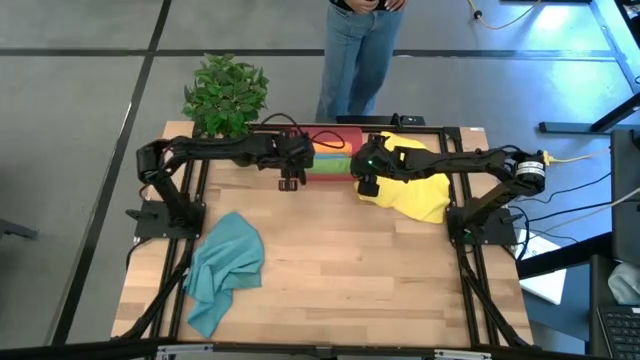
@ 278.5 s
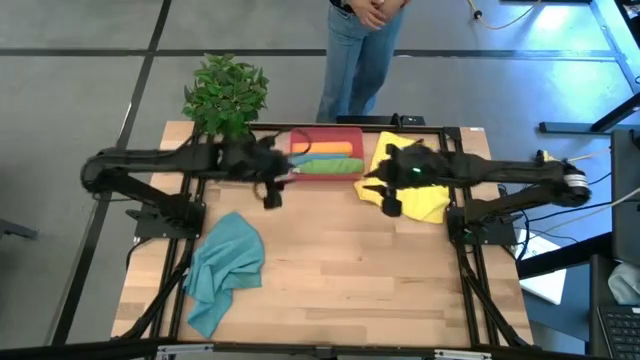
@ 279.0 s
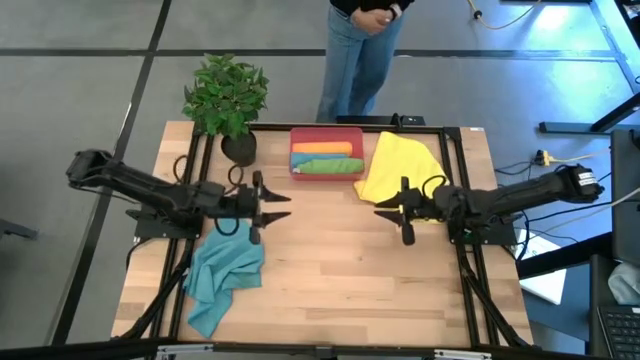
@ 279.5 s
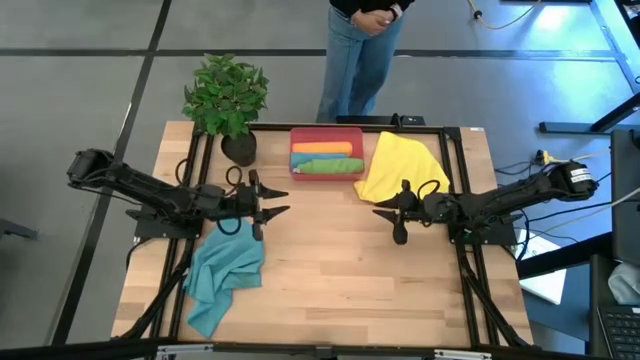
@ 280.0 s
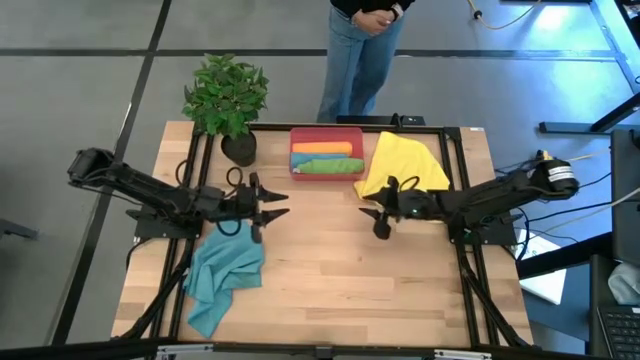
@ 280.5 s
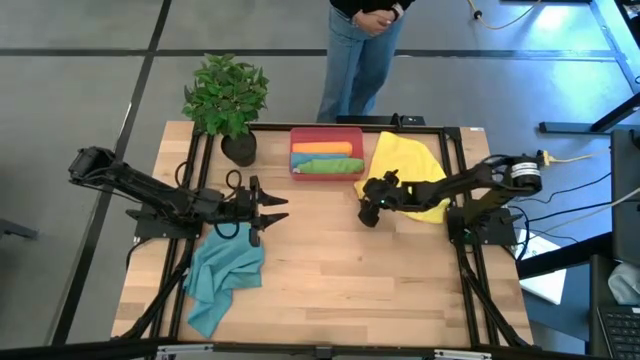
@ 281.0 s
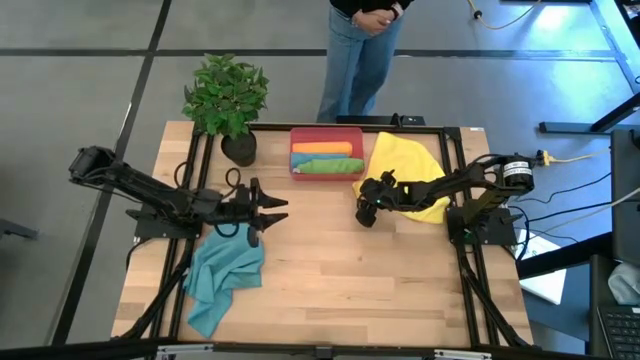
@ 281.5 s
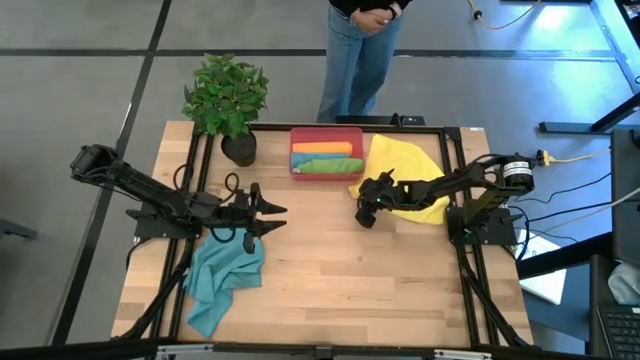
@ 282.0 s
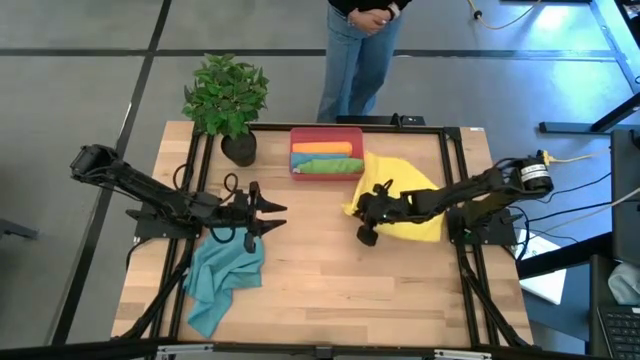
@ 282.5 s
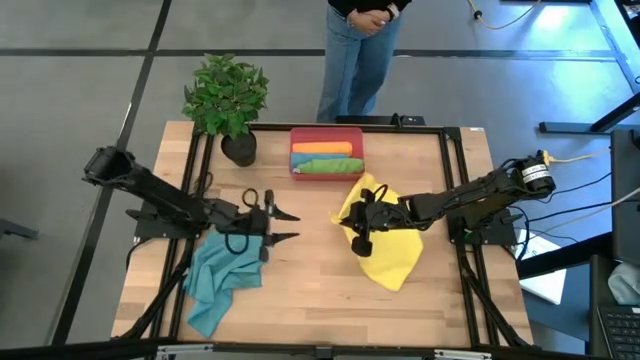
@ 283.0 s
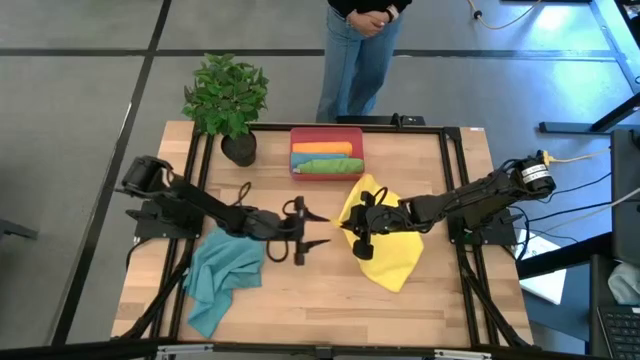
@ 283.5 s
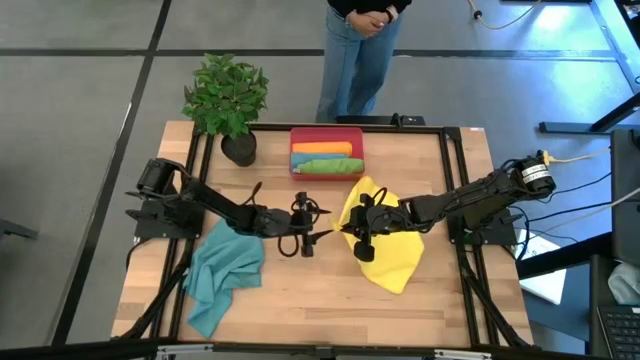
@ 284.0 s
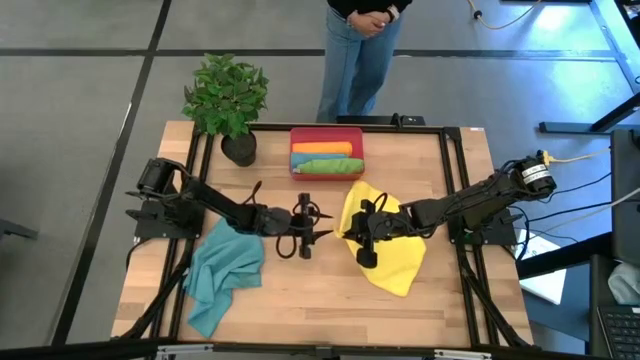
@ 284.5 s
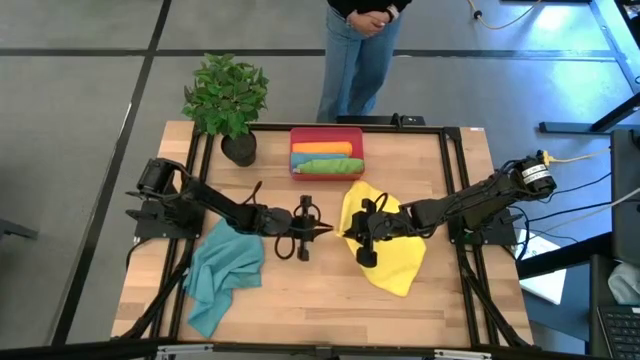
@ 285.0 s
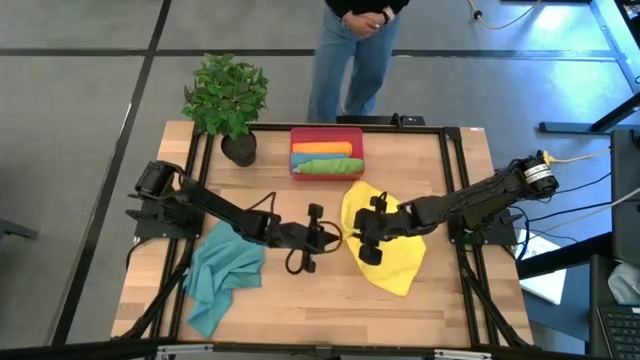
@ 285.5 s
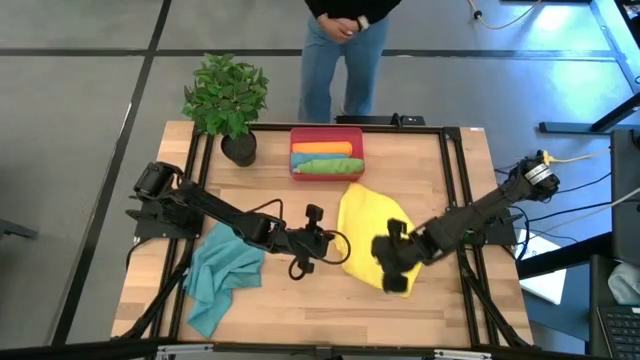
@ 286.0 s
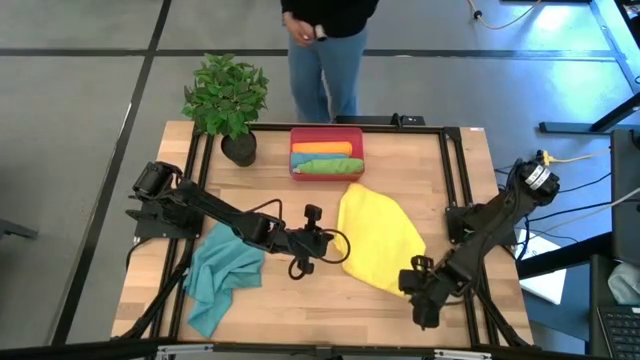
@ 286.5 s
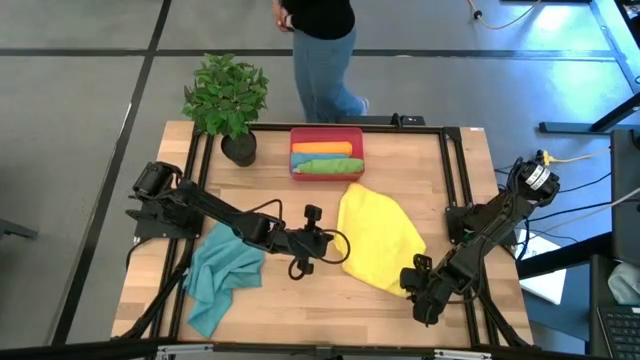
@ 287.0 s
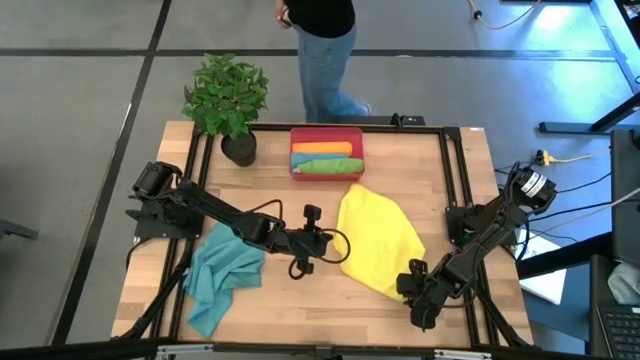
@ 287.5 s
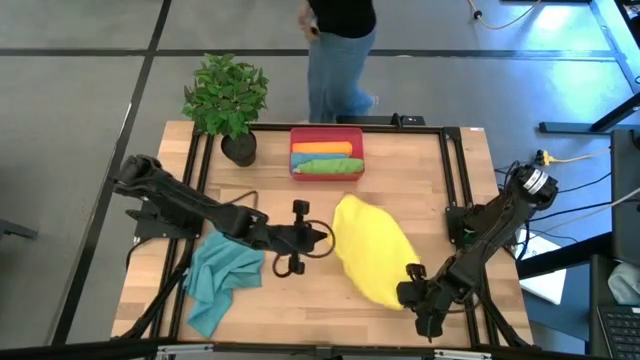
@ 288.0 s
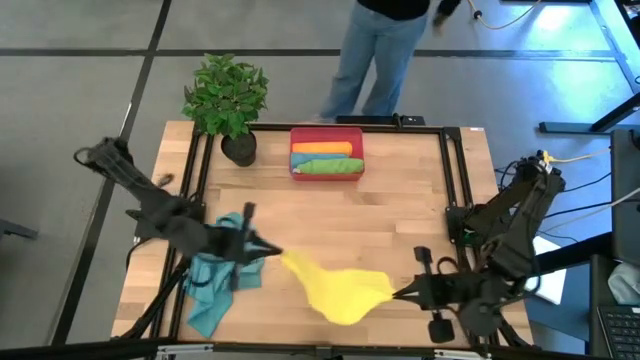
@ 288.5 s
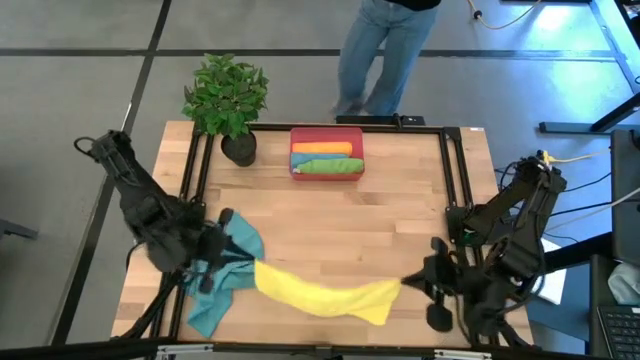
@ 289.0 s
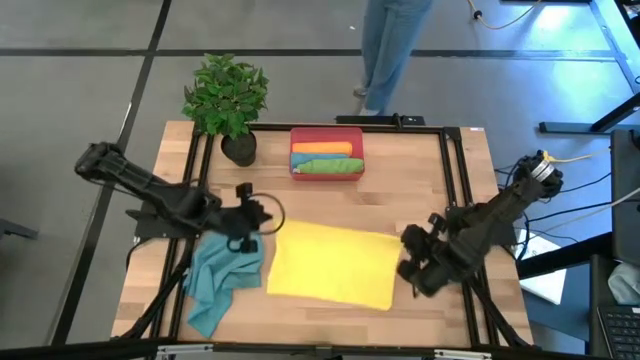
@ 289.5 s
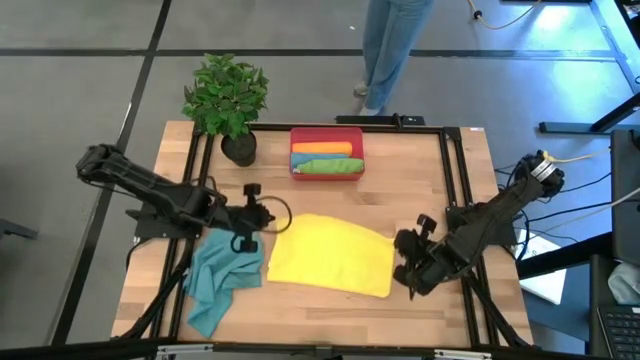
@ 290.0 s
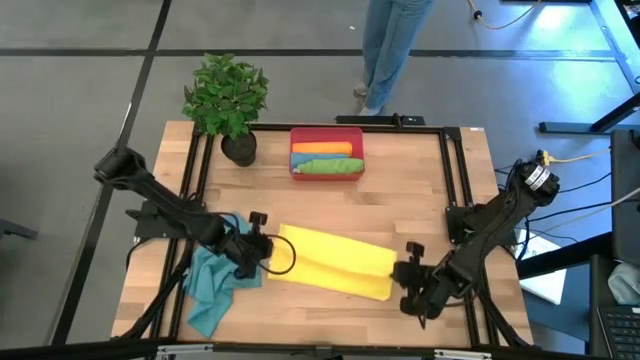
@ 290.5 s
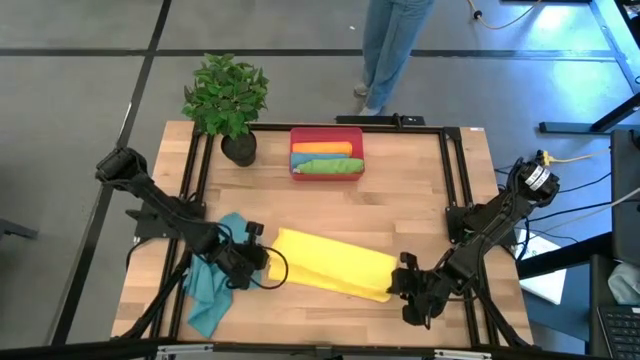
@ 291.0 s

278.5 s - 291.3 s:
Task: Roll microfiber towels into tight, uniform cylinder then place into a basket
Fold the yellow towel

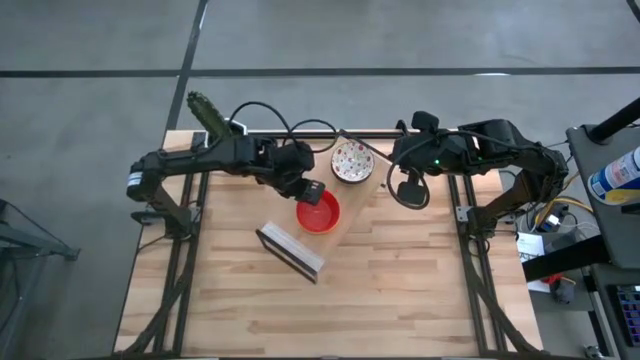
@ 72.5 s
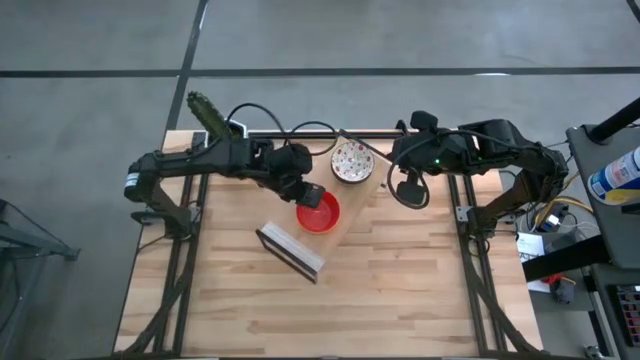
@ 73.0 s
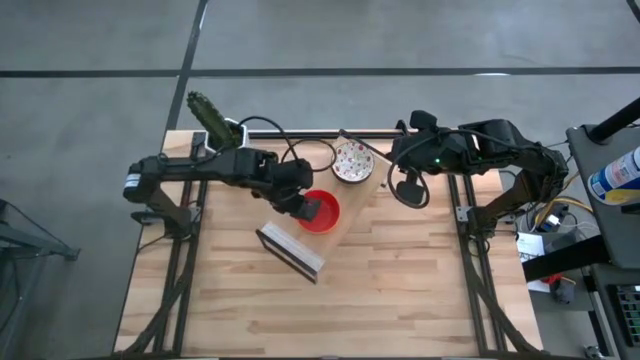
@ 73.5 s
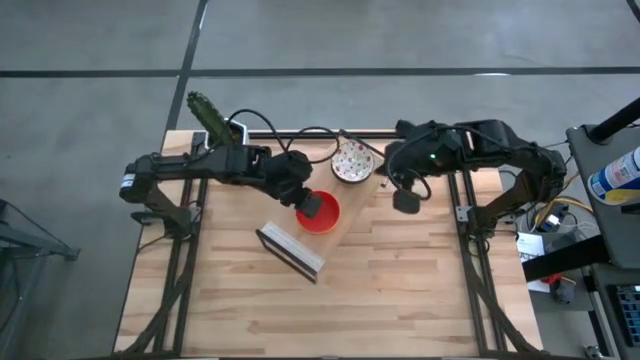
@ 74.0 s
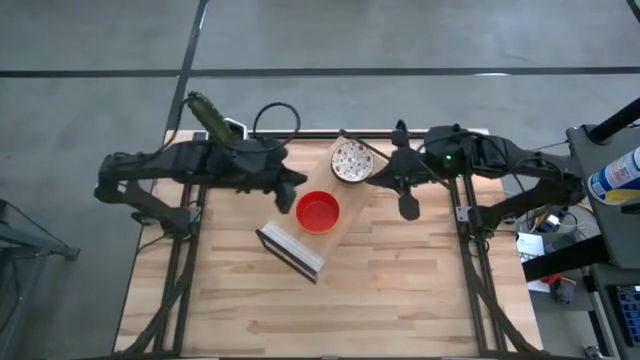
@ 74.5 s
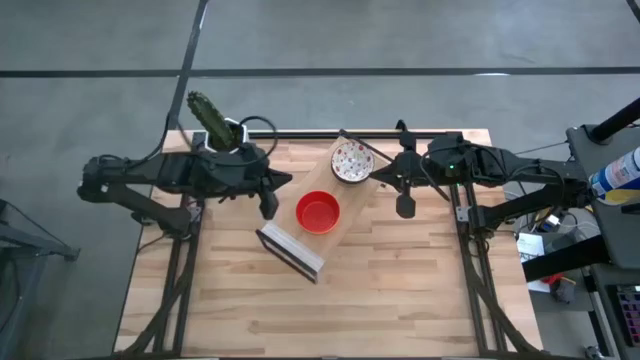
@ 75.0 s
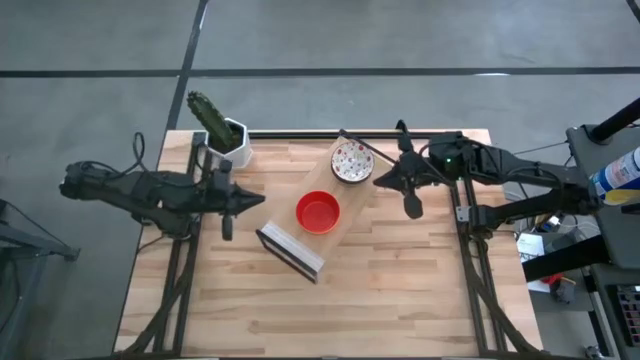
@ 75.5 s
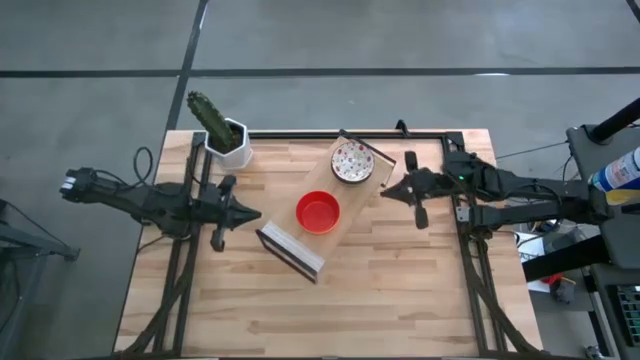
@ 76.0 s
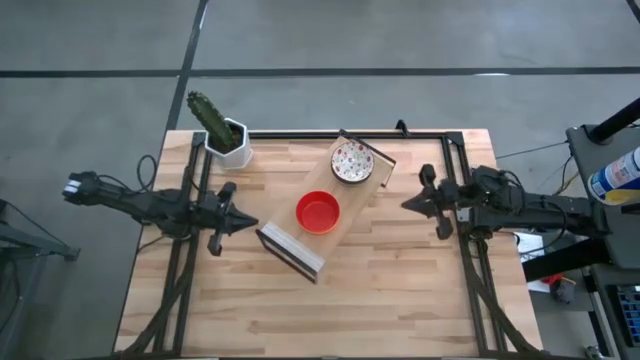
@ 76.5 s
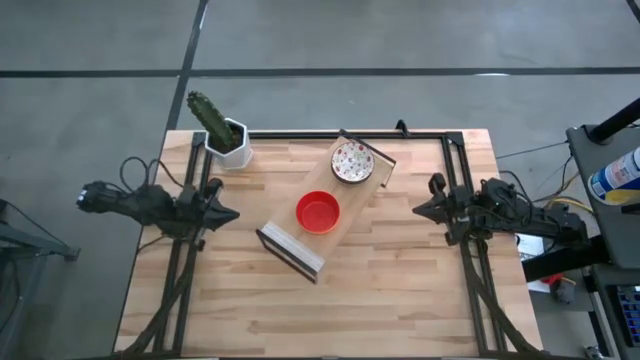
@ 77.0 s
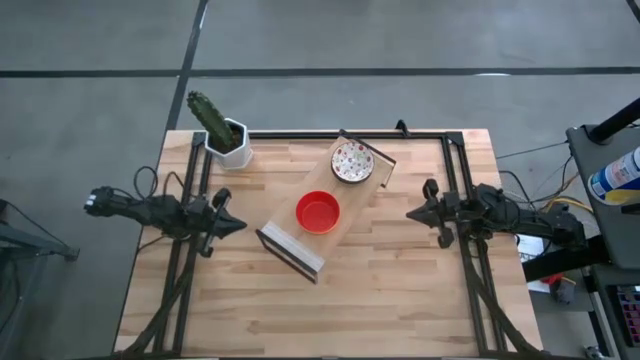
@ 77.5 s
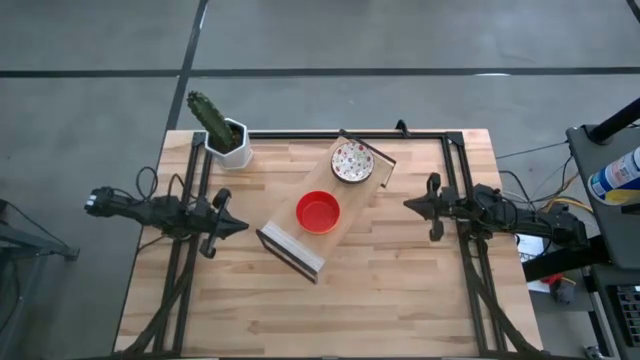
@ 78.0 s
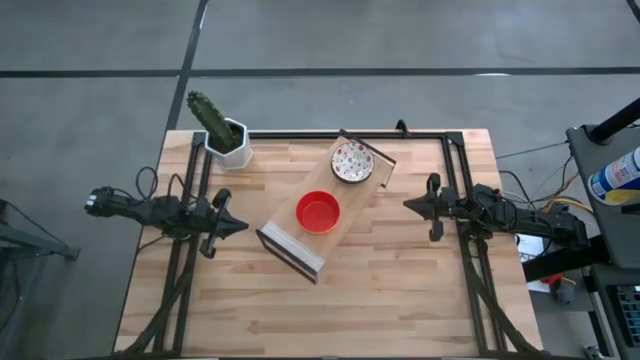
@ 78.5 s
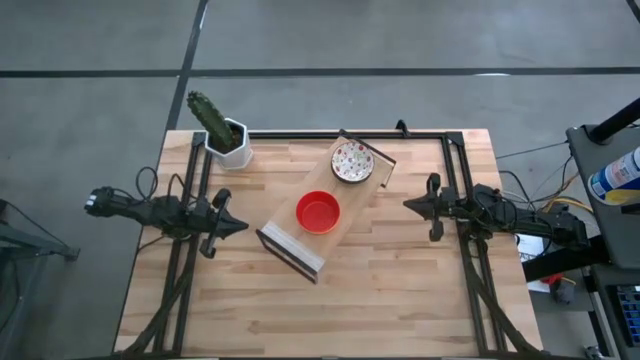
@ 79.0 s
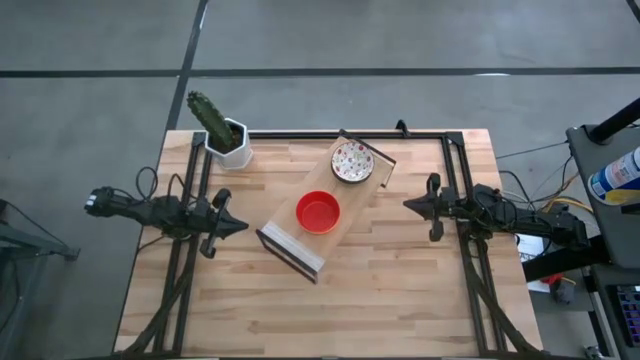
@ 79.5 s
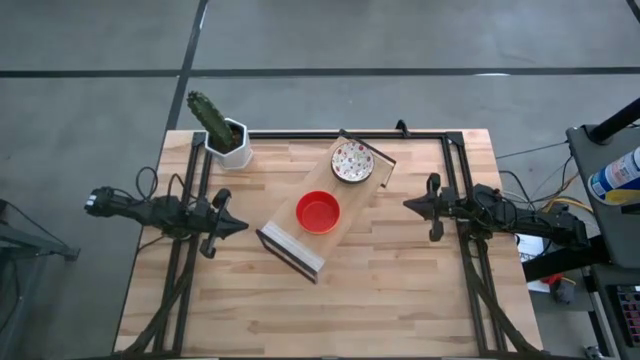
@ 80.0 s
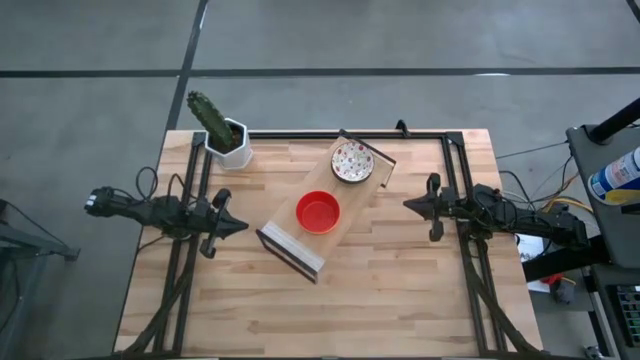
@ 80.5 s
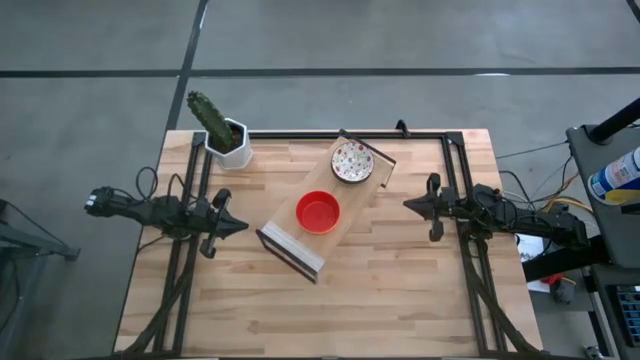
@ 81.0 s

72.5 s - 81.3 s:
Task: Pick & Place Mini bowls
Return to home position

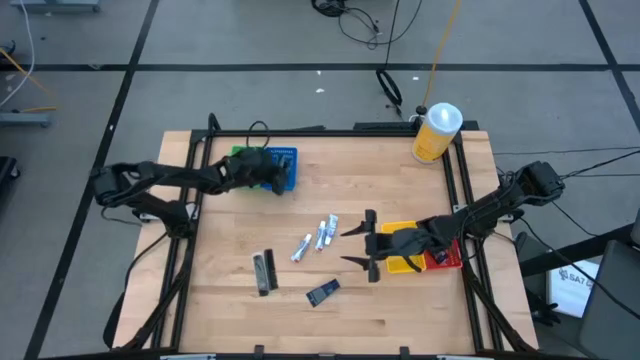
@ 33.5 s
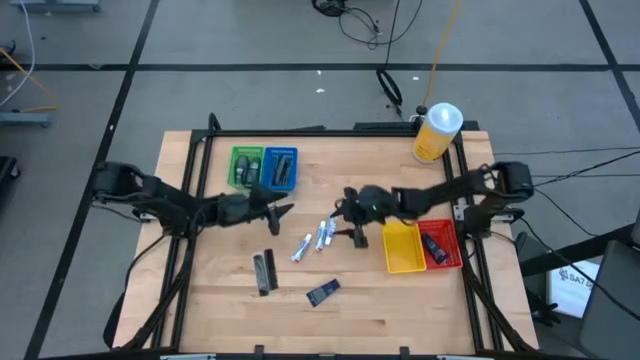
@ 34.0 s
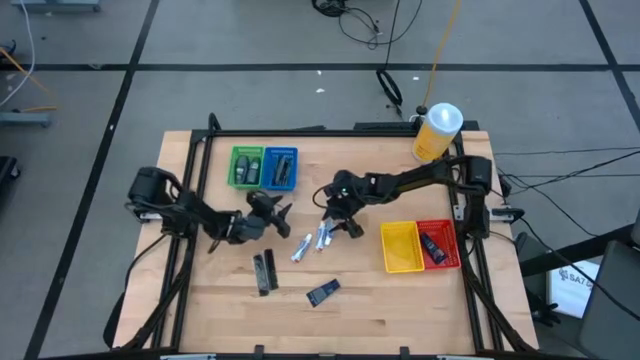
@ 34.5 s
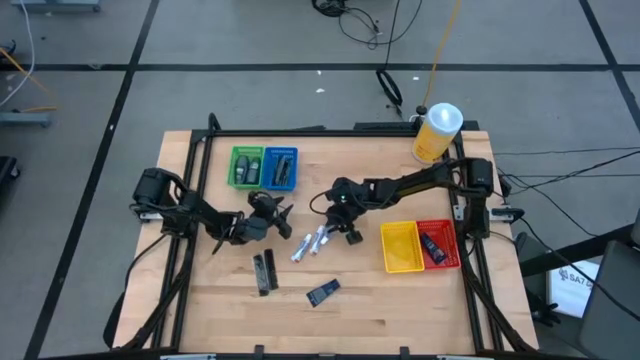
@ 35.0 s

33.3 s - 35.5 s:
Task: Pick & Place Travel size toiletries
Put the white toothpaste into the yellow bin
